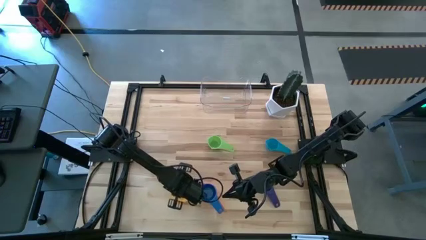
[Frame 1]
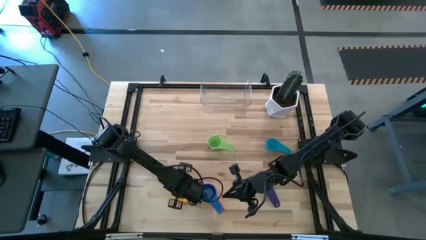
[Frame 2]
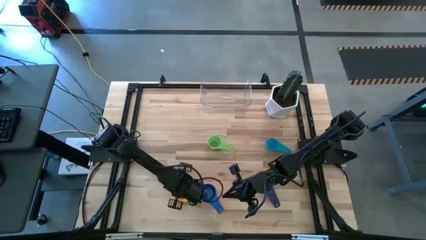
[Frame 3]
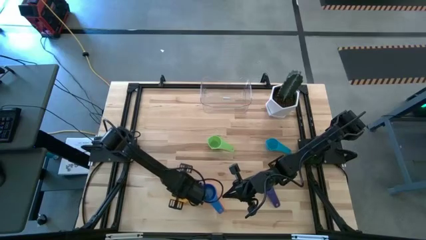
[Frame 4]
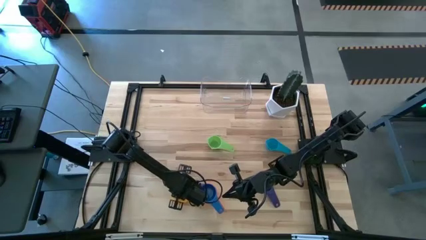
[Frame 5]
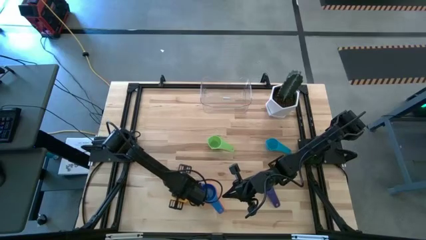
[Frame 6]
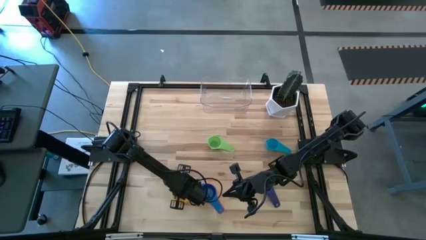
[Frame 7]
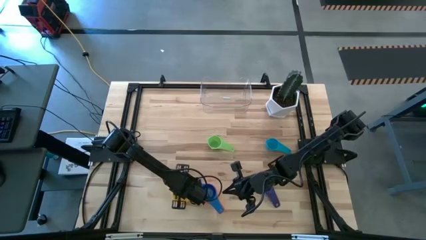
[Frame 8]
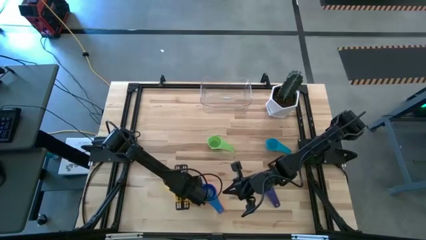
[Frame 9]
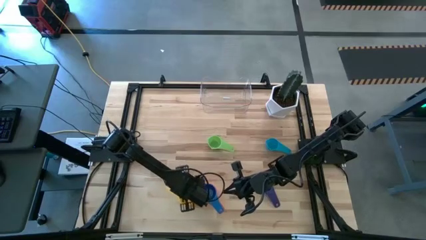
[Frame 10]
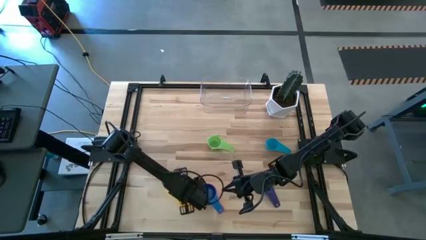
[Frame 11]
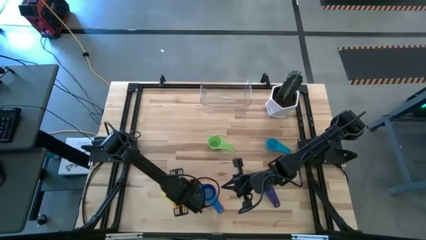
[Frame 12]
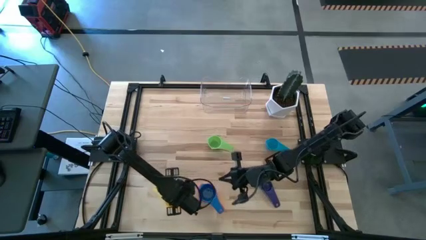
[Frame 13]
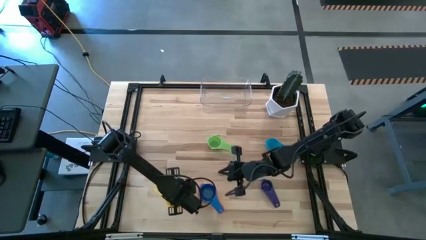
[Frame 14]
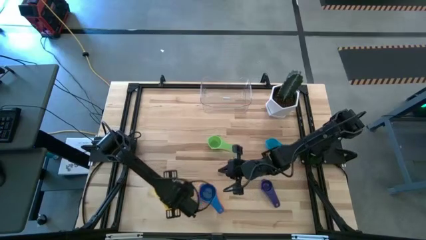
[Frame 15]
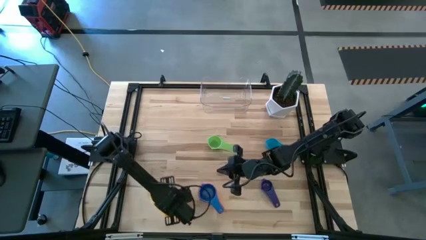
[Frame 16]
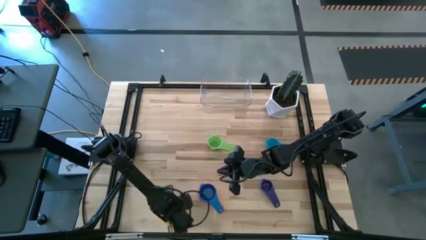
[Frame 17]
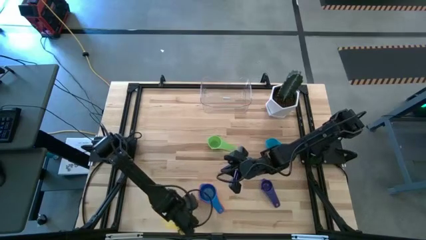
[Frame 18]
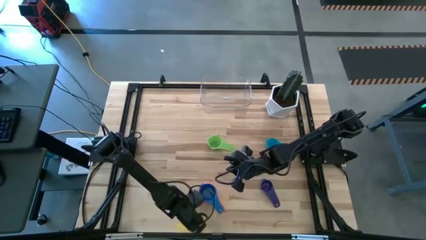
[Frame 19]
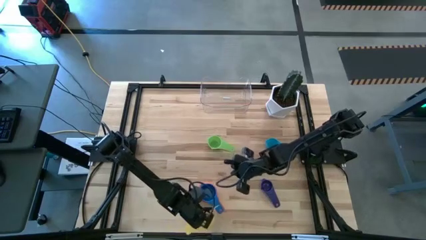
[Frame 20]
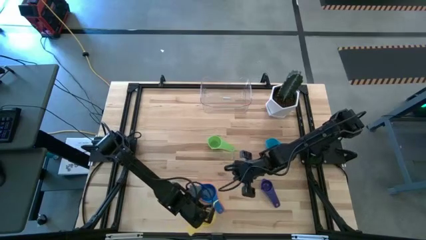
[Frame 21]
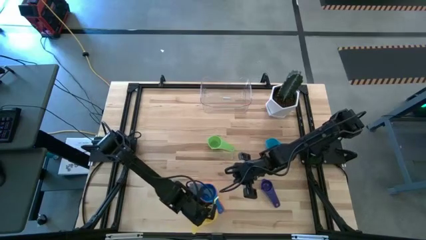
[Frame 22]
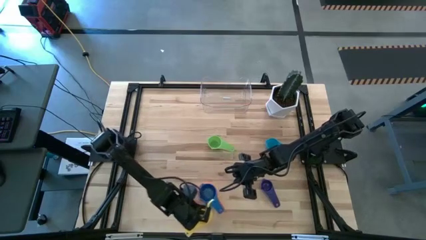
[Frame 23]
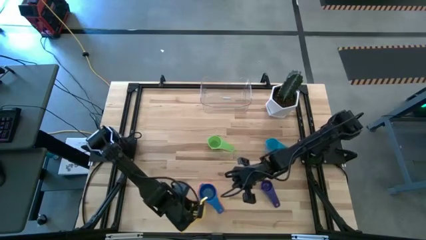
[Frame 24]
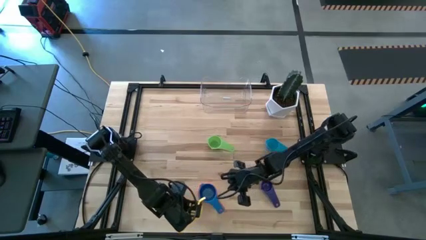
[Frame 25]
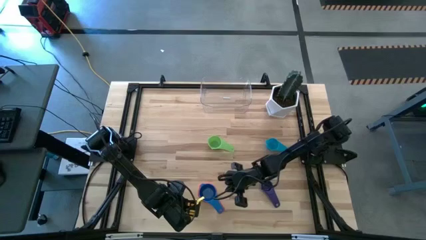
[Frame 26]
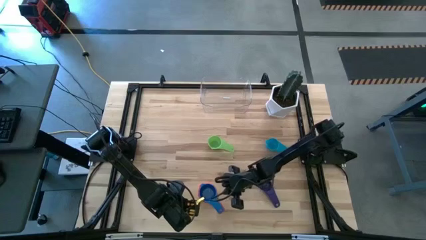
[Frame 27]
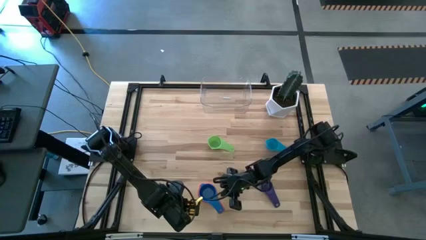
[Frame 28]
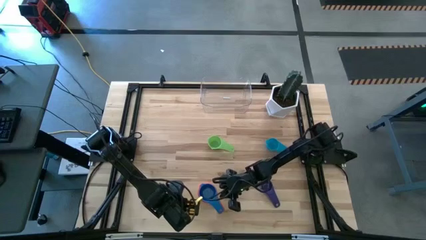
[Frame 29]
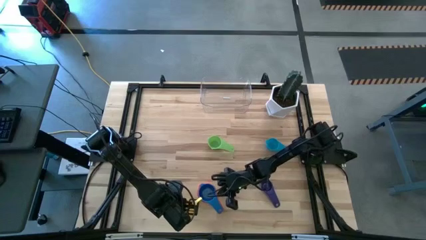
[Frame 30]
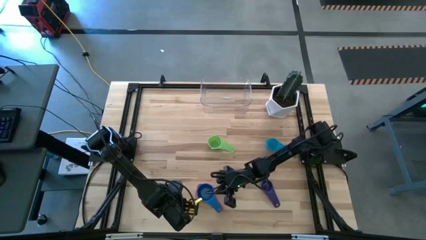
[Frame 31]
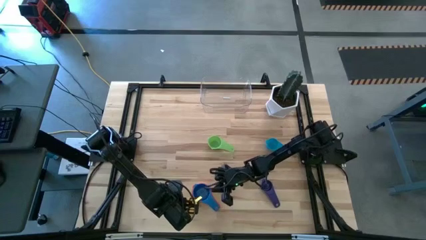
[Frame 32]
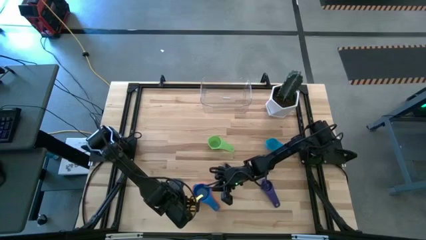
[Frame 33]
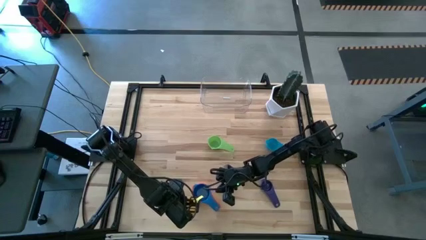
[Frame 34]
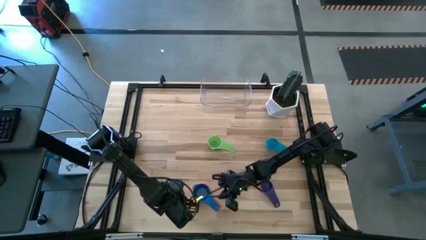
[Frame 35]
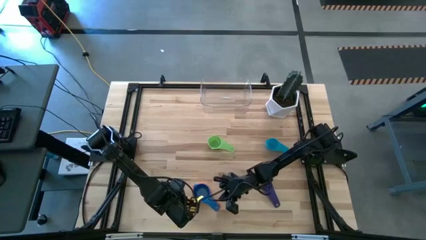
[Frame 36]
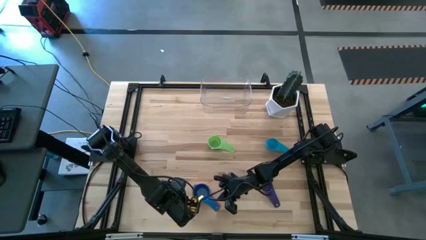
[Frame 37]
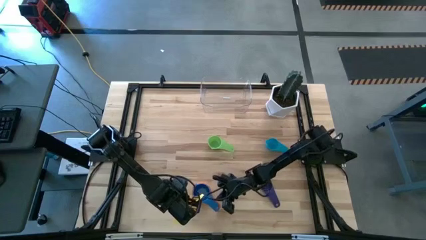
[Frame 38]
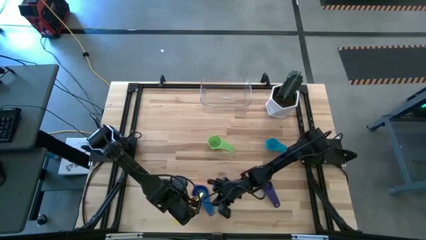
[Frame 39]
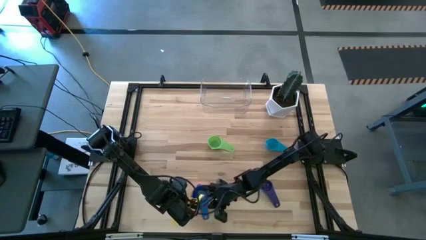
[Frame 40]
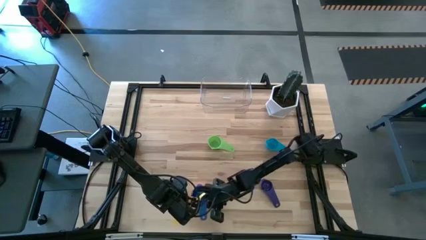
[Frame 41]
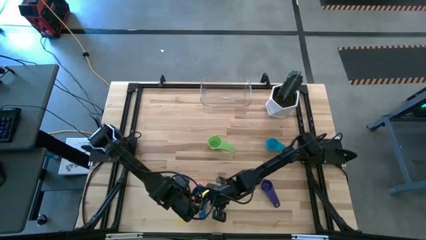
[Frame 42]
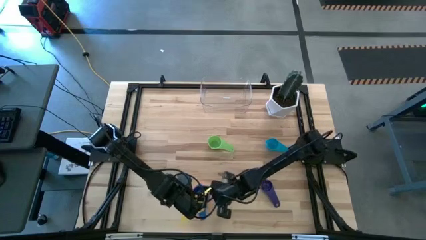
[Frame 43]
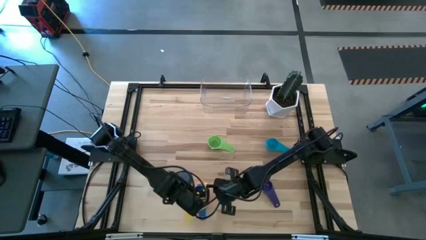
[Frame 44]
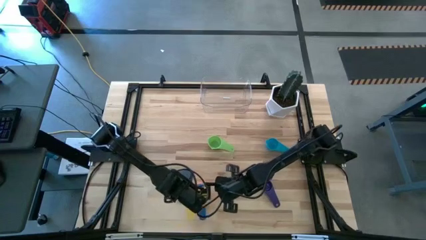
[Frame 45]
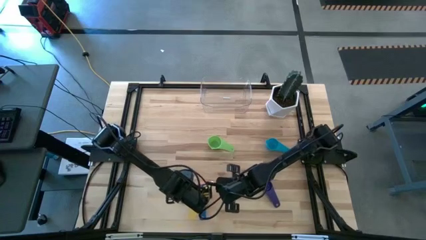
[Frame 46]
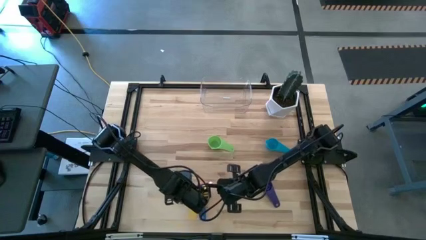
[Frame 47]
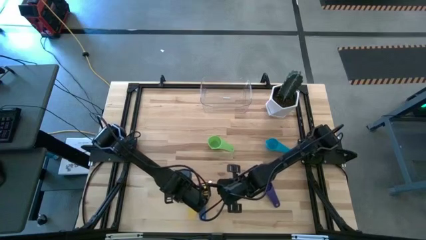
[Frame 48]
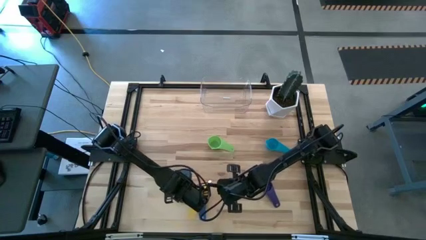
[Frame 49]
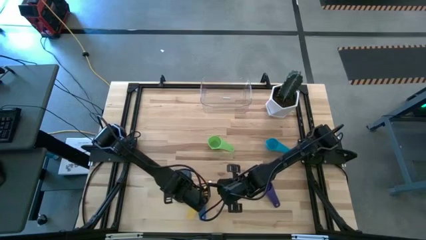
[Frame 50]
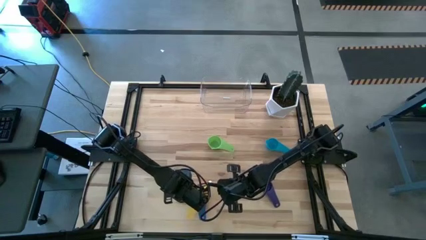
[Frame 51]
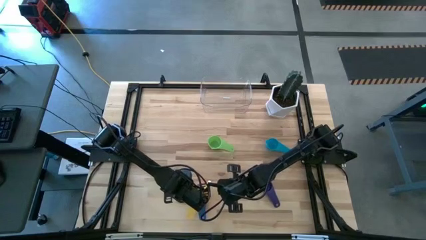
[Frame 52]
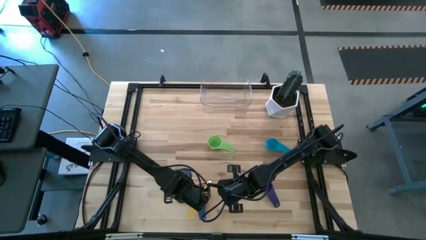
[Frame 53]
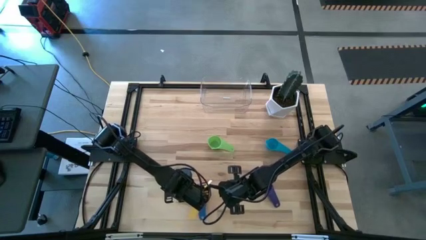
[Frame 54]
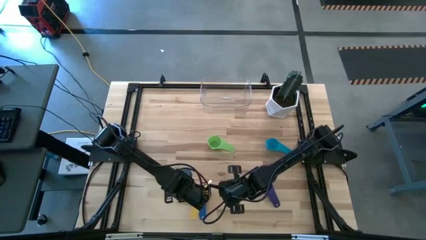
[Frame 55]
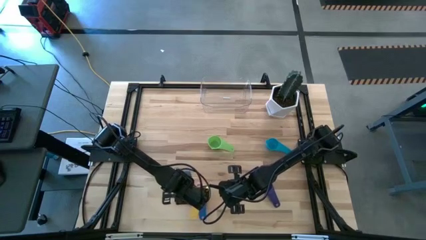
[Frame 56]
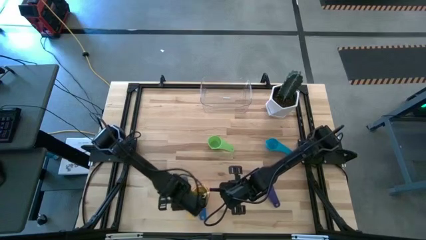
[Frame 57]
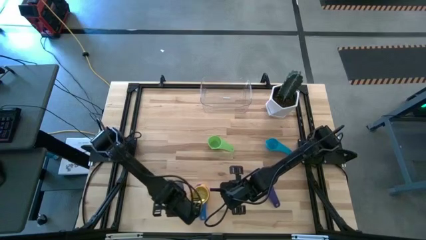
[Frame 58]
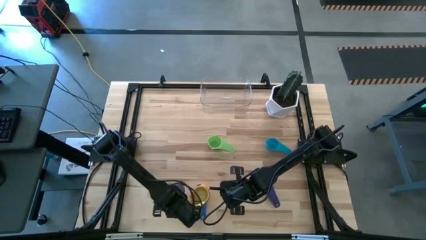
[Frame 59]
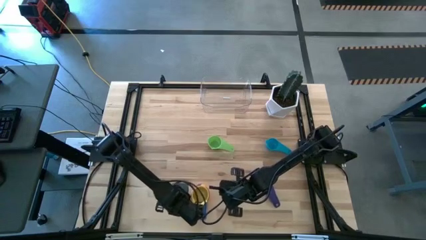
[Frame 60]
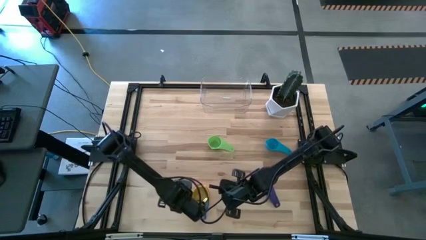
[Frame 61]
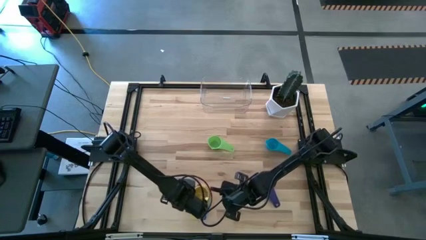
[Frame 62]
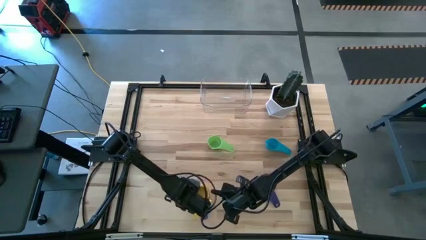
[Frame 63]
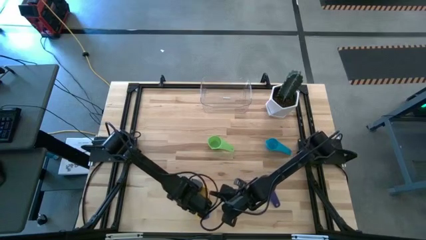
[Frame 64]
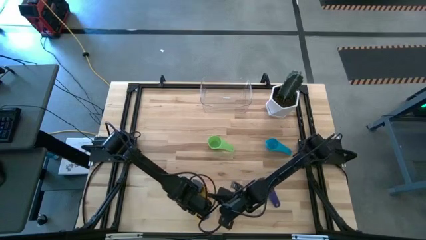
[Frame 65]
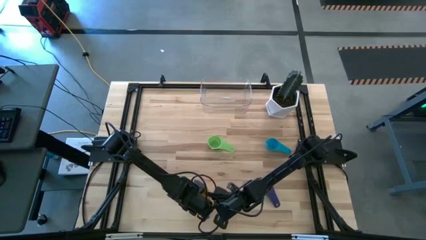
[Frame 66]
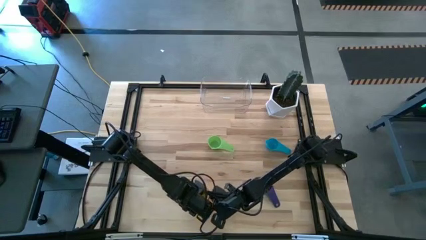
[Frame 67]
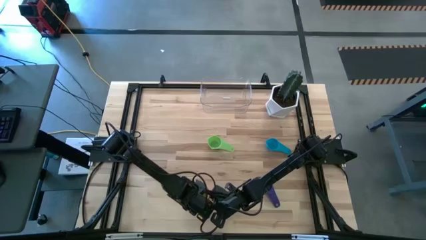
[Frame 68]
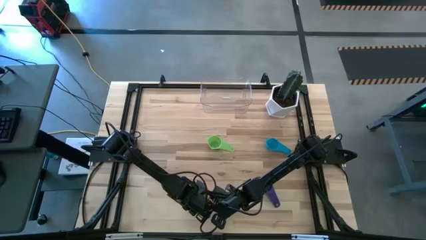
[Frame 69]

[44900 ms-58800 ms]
Task: Nest measuring cups in basket
Stack the yellow measuring cup on top of the blue measuring cup
